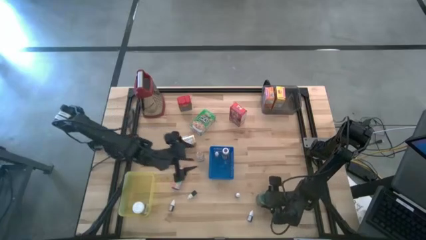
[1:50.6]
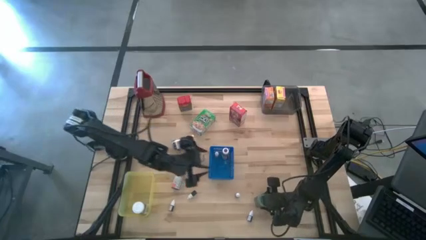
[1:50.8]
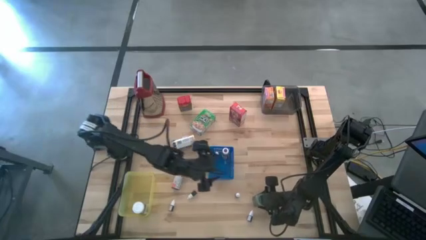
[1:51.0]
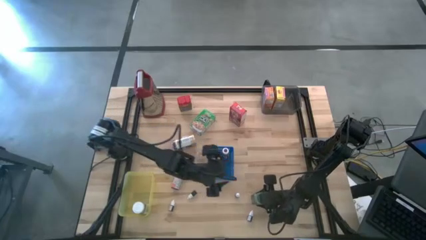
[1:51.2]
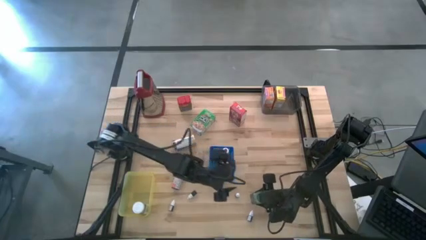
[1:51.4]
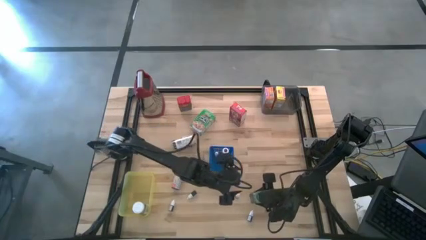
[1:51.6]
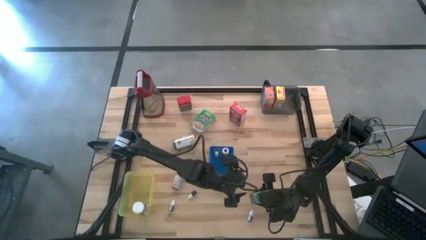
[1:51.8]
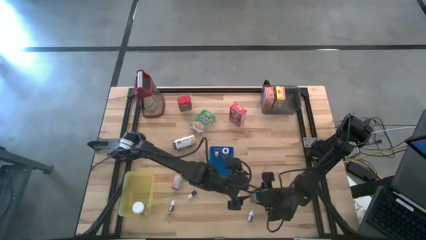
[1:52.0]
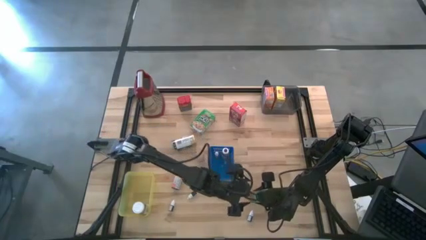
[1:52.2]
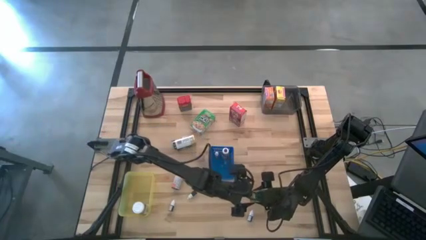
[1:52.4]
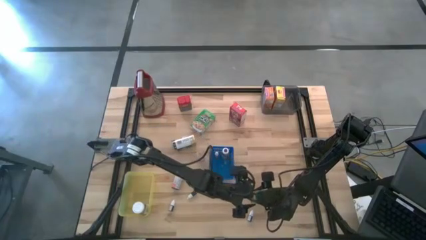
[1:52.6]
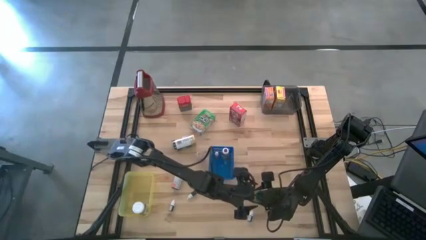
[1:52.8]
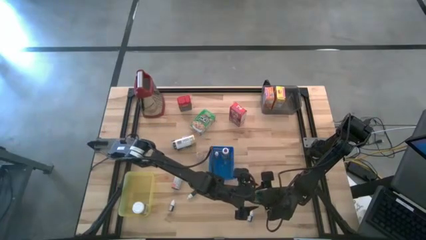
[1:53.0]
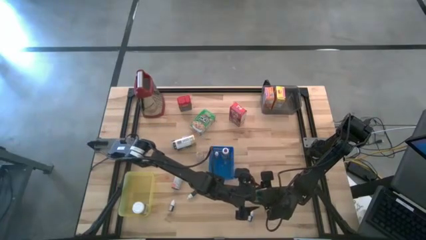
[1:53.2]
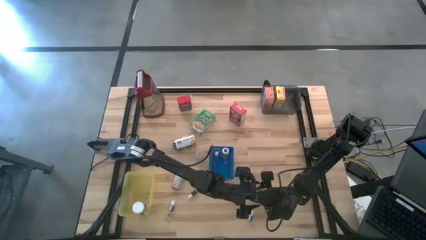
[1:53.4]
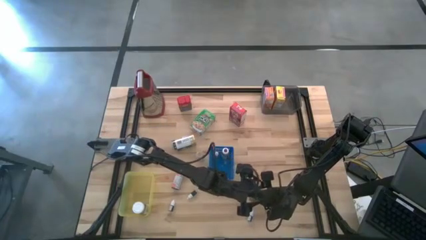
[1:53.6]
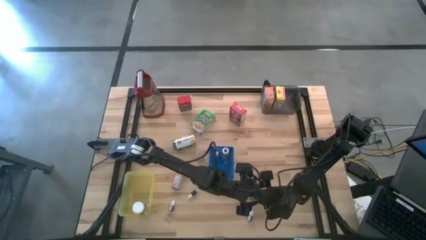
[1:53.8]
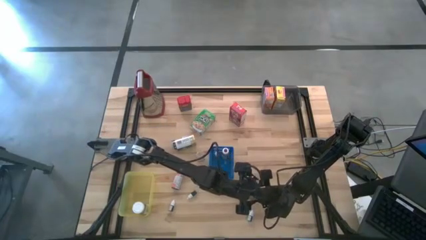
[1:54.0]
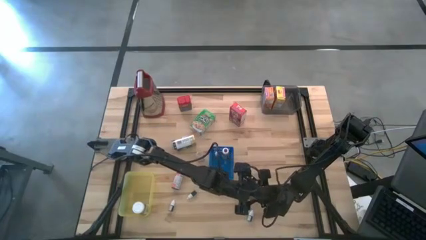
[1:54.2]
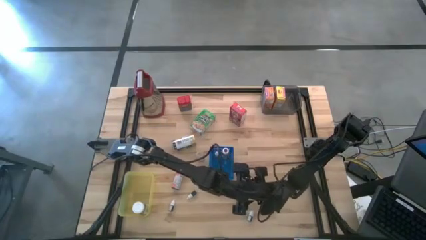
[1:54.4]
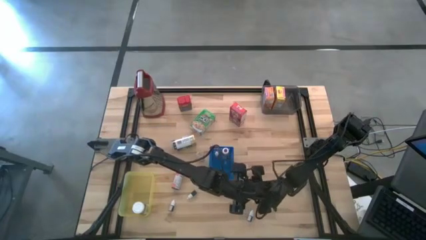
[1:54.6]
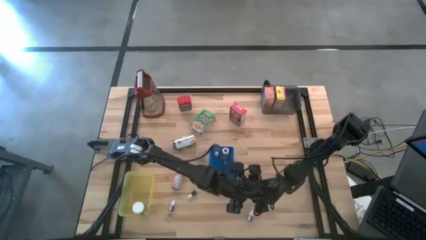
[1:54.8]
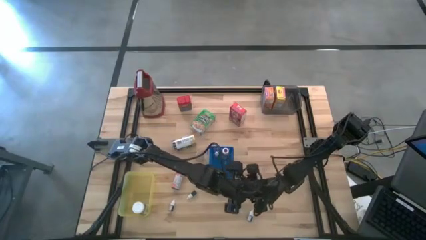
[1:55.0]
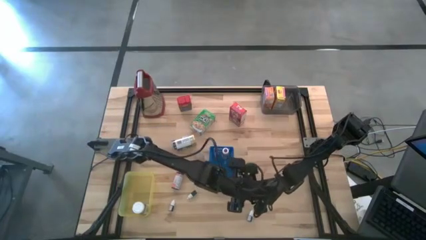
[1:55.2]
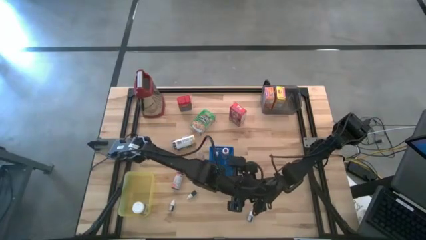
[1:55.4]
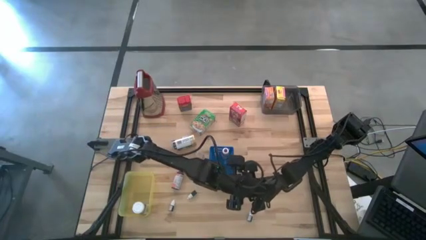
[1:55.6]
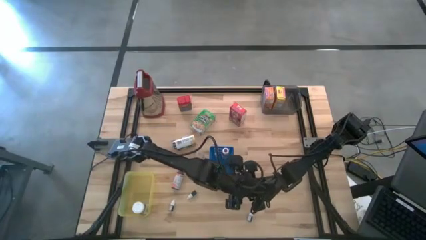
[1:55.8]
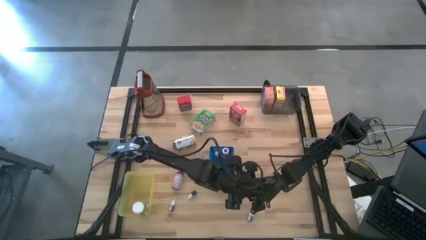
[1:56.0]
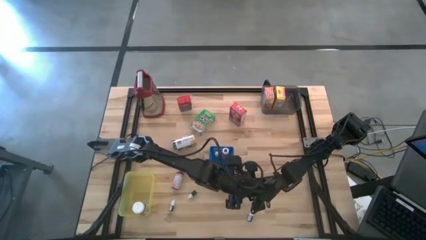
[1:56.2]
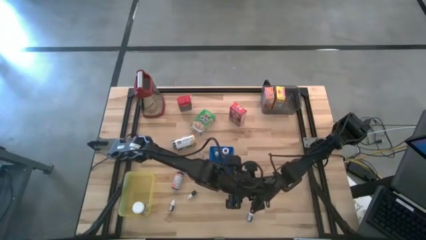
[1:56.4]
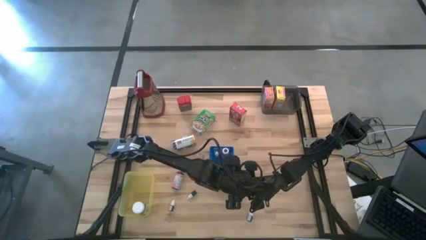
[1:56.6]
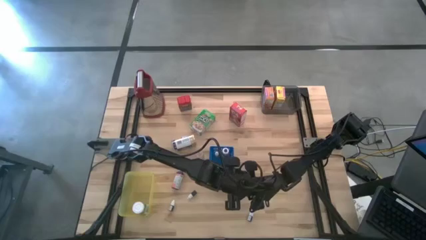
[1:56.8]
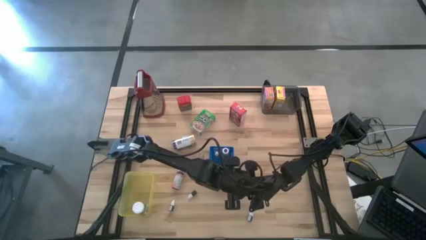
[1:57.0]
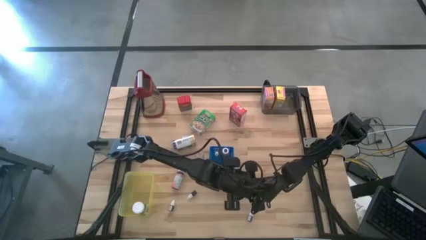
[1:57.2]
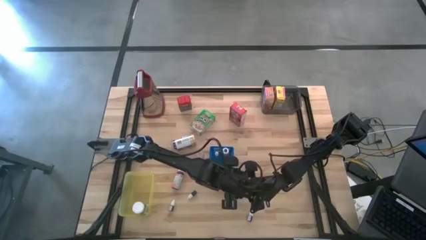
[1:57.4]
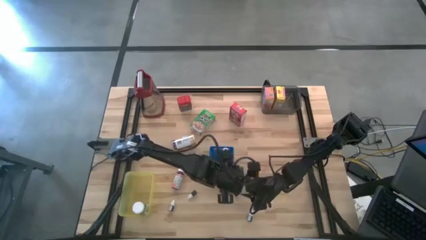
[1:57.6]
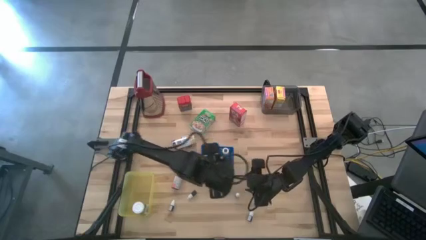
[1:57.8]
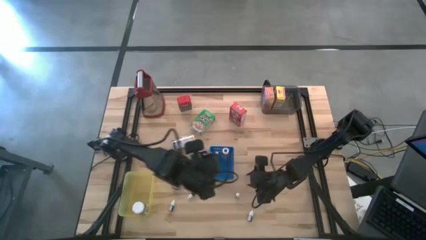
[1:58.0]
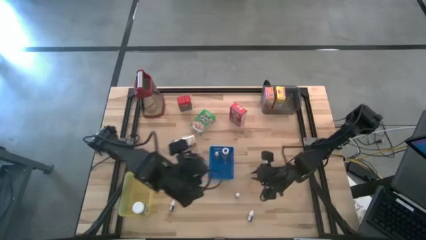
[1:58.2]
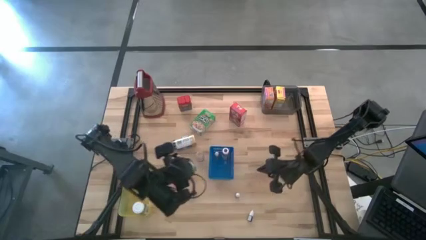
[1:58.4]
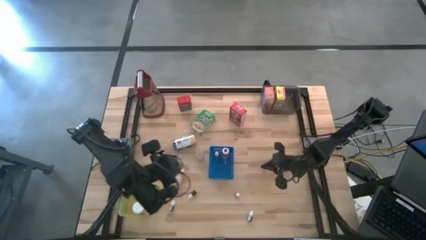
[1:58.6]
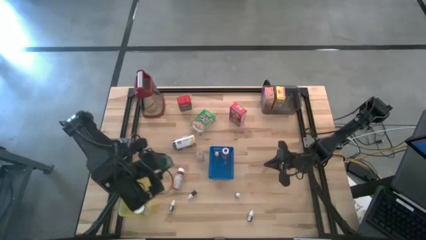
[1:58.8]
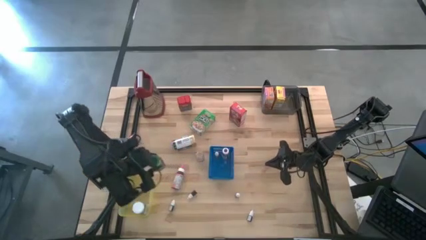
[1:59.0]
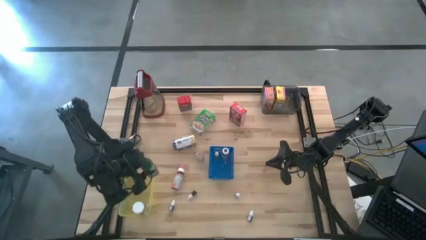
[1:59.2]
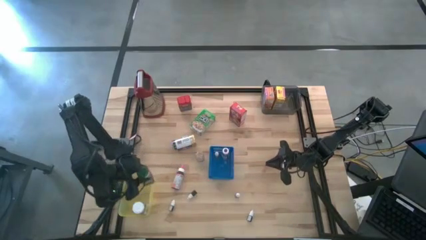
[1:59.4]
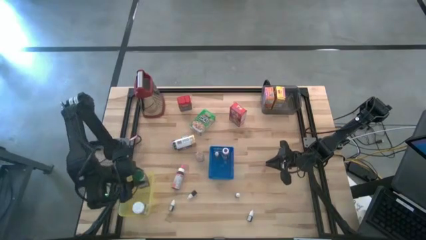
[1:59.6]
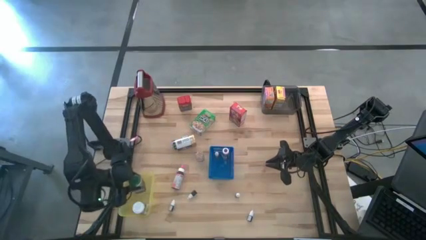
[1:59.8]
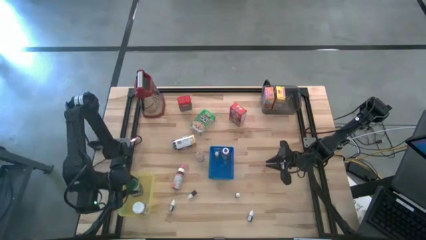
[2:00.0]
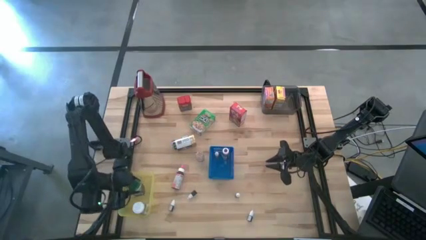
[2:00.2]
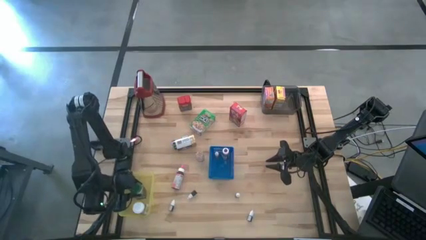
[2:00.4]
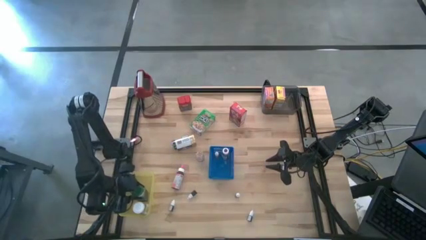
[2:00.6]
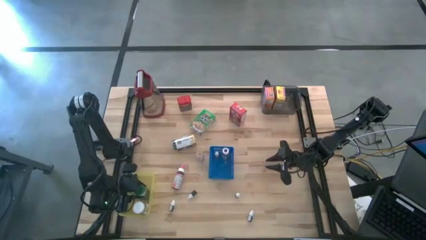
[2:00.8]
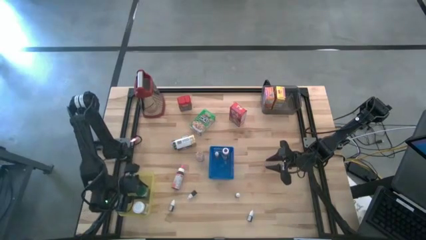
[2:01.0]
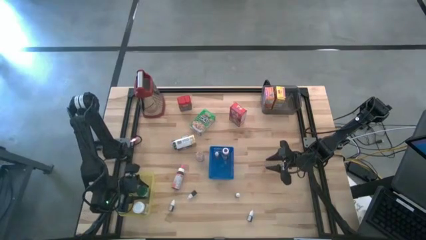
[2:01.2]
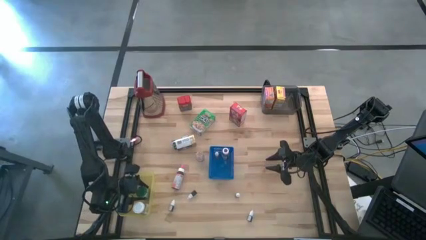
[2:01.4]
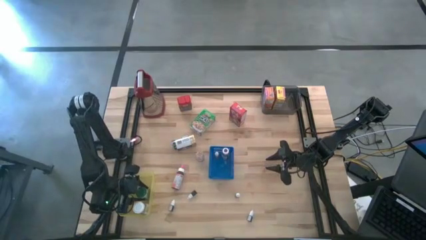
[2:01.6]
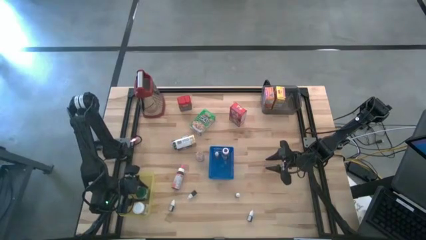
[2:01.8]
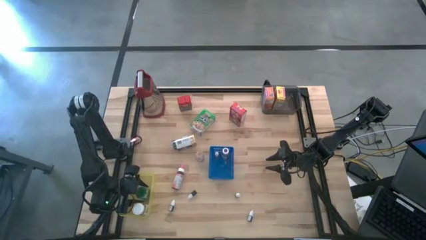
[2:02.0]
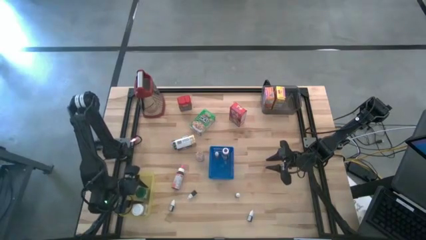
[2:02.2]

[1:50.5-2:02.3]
Task: Pick & Place Kitchen Items
Put the green seasoning bottle into the yellow bin
